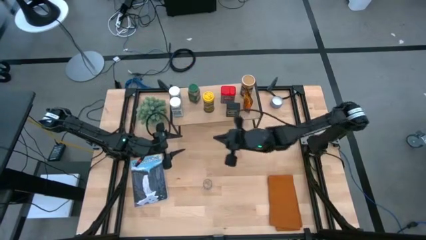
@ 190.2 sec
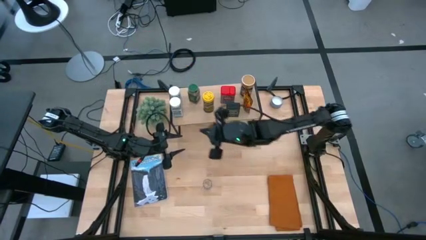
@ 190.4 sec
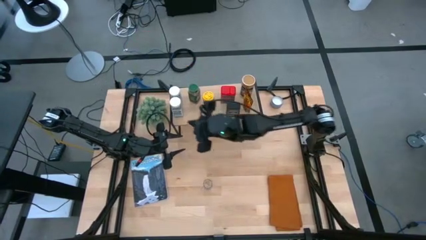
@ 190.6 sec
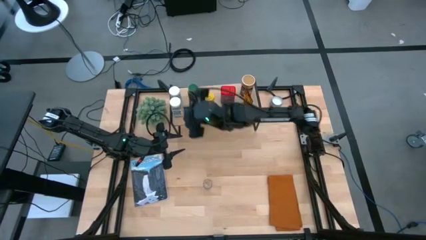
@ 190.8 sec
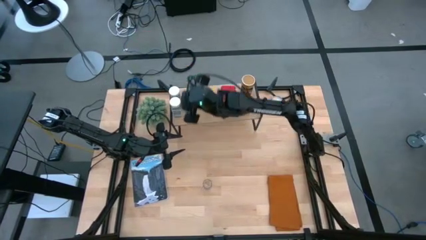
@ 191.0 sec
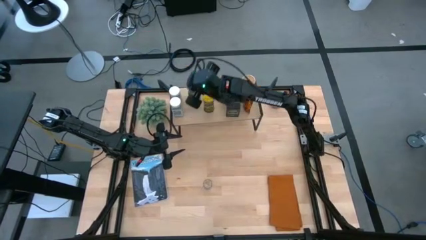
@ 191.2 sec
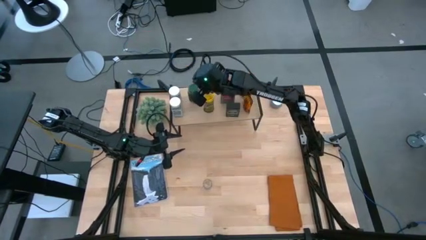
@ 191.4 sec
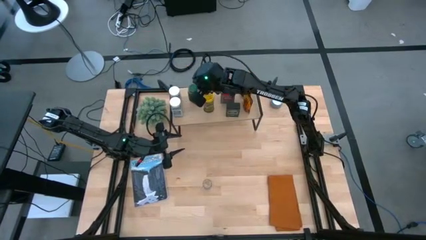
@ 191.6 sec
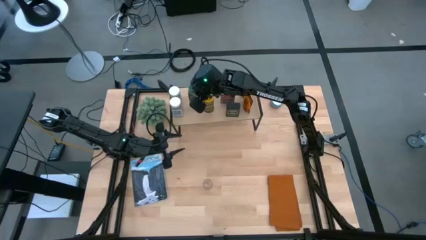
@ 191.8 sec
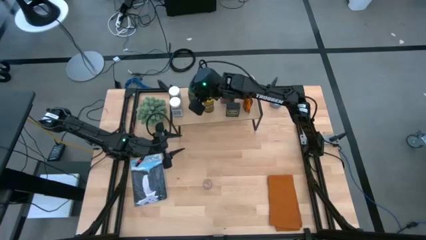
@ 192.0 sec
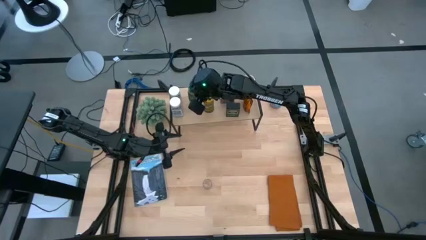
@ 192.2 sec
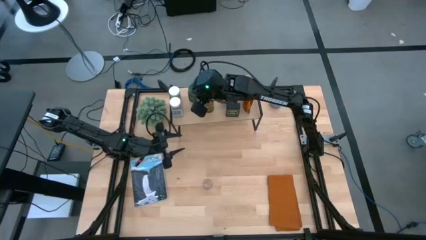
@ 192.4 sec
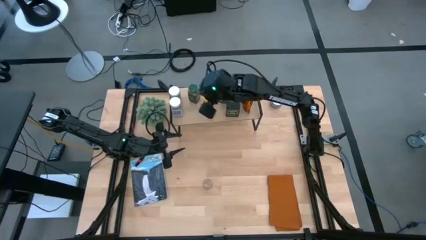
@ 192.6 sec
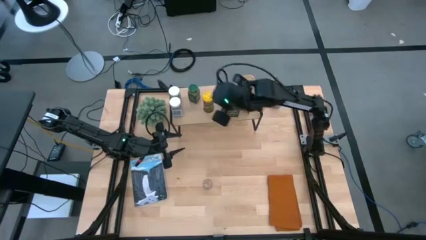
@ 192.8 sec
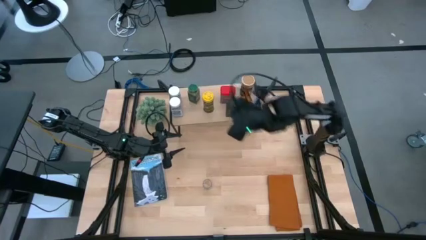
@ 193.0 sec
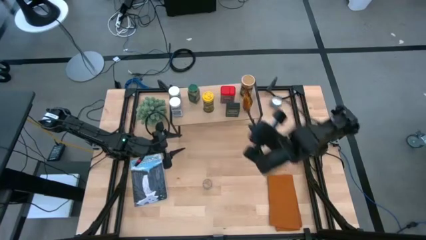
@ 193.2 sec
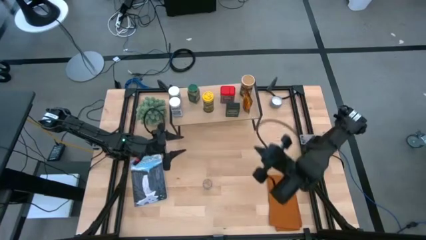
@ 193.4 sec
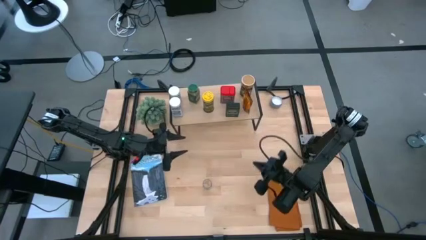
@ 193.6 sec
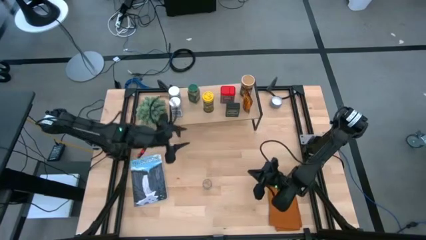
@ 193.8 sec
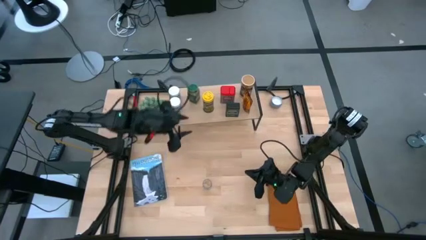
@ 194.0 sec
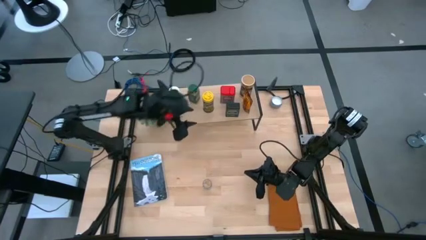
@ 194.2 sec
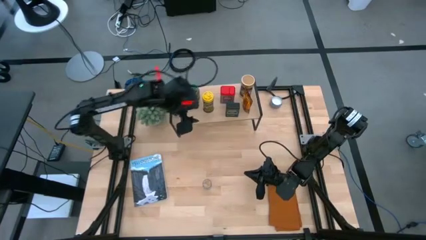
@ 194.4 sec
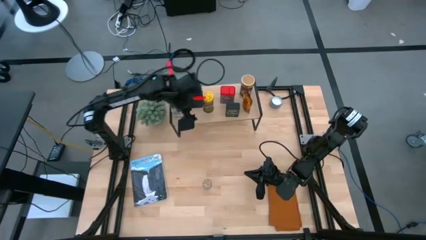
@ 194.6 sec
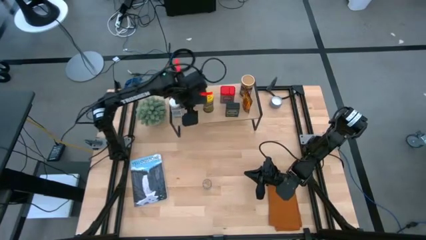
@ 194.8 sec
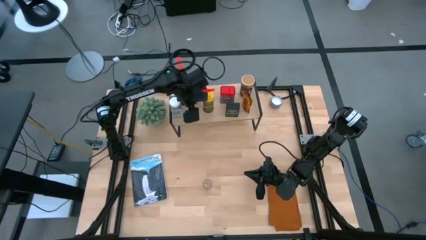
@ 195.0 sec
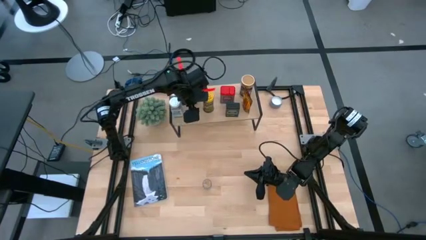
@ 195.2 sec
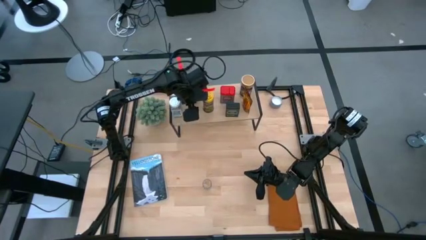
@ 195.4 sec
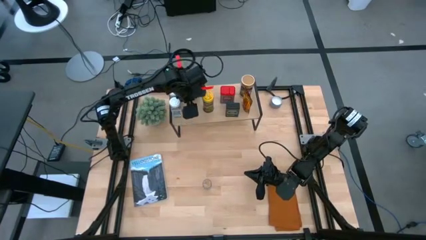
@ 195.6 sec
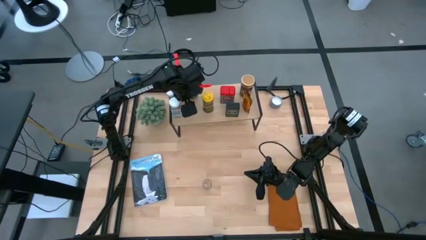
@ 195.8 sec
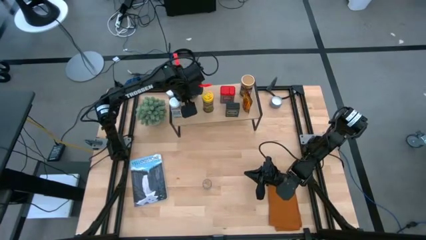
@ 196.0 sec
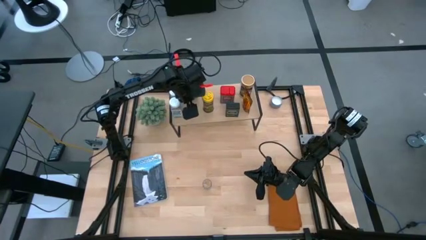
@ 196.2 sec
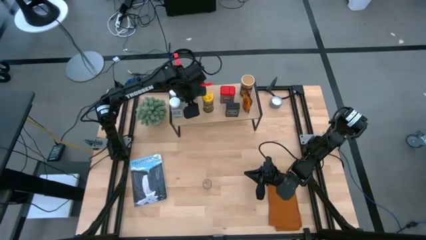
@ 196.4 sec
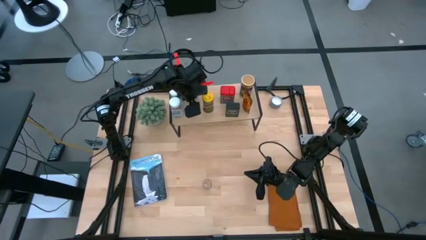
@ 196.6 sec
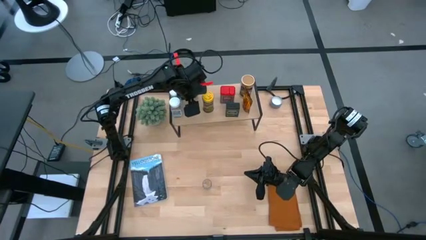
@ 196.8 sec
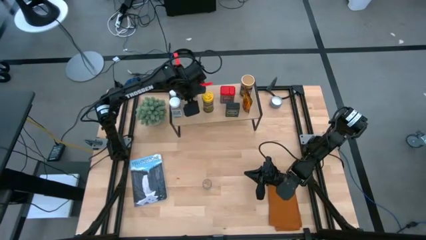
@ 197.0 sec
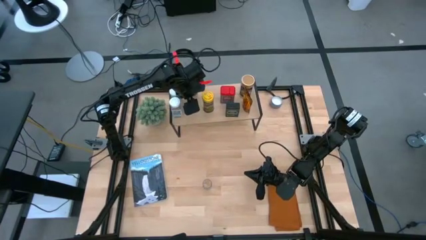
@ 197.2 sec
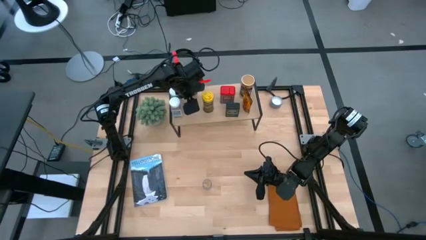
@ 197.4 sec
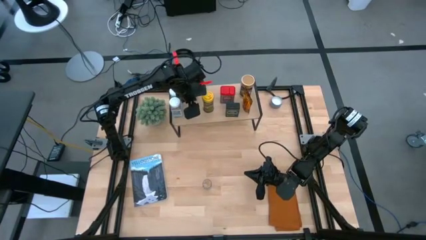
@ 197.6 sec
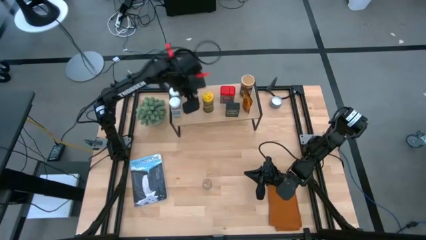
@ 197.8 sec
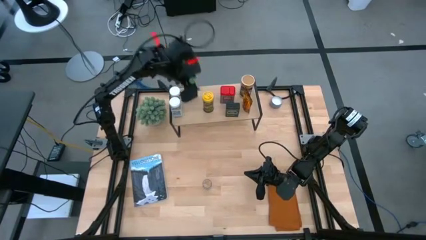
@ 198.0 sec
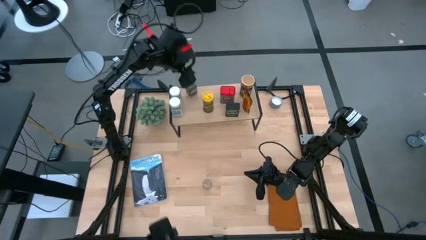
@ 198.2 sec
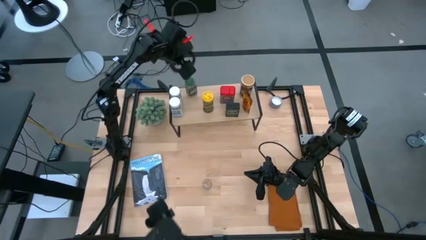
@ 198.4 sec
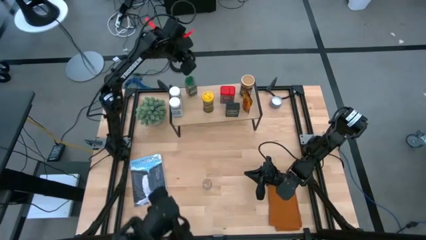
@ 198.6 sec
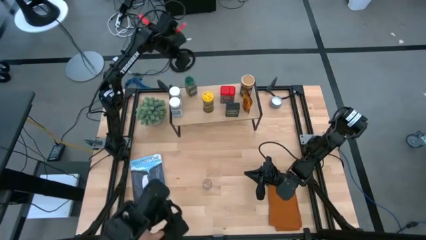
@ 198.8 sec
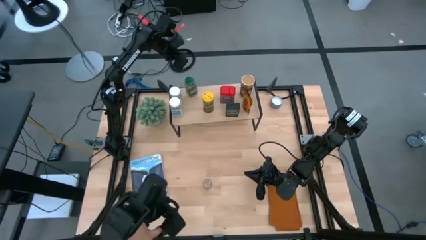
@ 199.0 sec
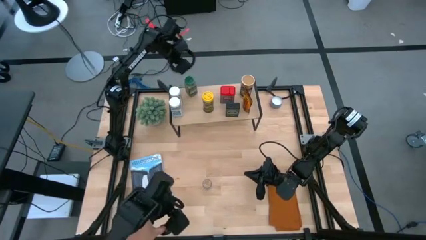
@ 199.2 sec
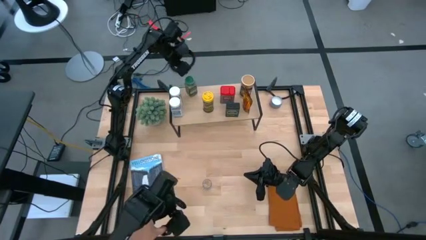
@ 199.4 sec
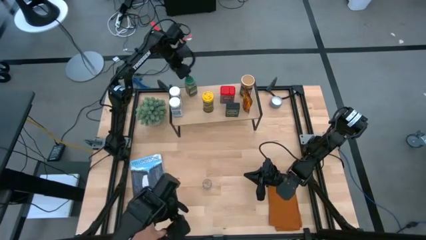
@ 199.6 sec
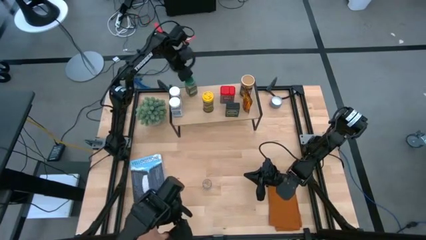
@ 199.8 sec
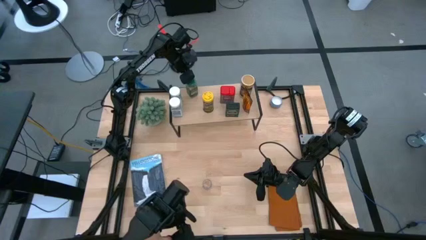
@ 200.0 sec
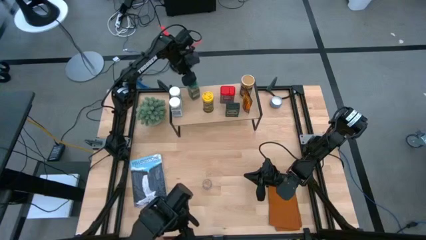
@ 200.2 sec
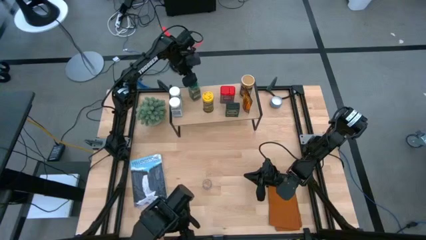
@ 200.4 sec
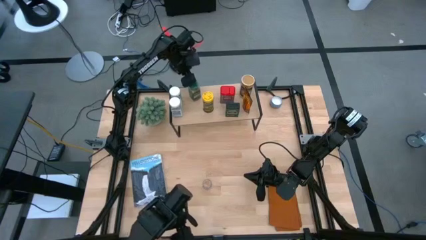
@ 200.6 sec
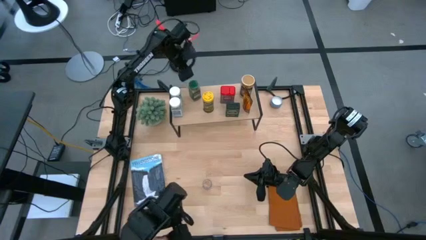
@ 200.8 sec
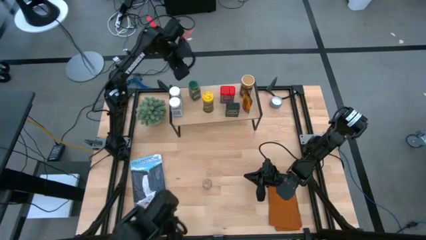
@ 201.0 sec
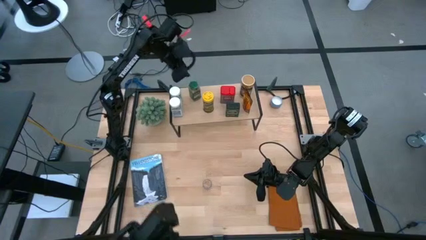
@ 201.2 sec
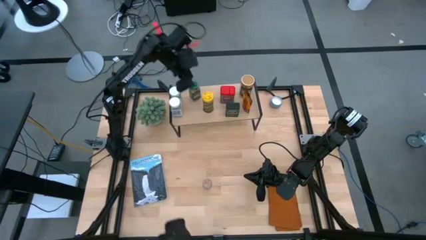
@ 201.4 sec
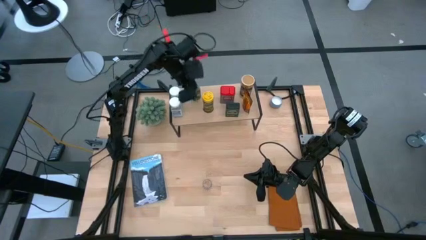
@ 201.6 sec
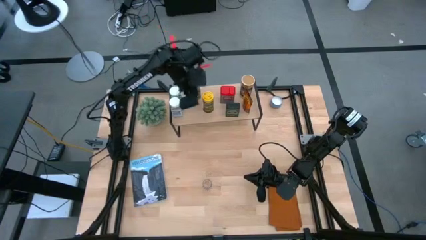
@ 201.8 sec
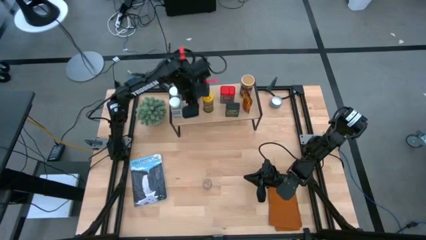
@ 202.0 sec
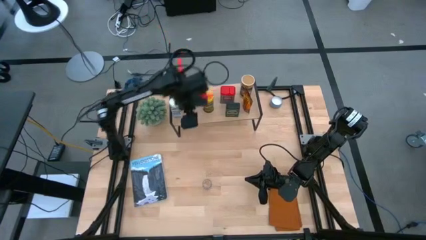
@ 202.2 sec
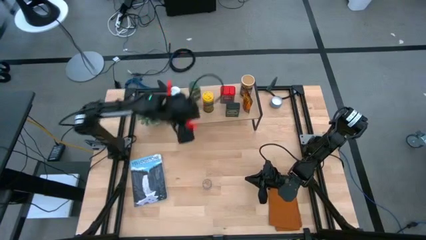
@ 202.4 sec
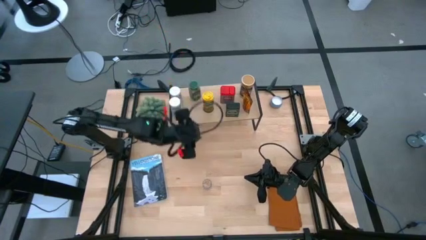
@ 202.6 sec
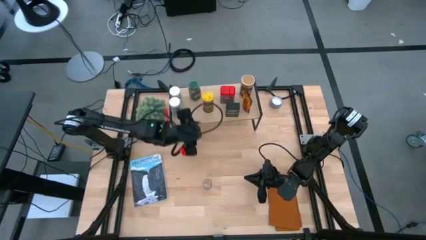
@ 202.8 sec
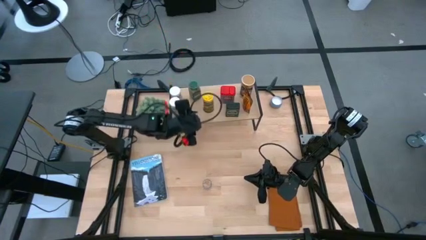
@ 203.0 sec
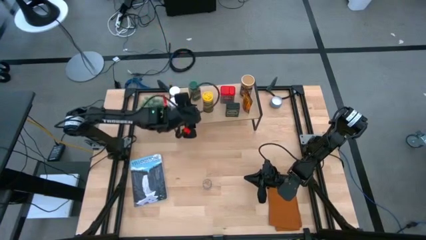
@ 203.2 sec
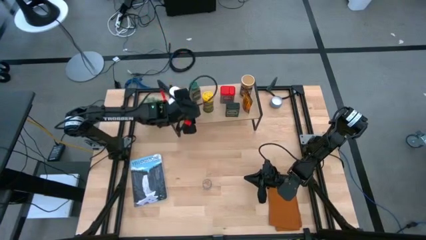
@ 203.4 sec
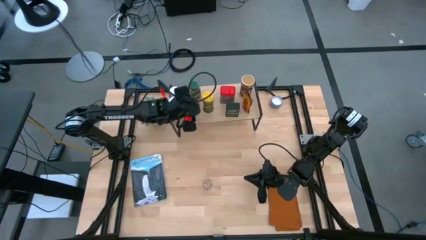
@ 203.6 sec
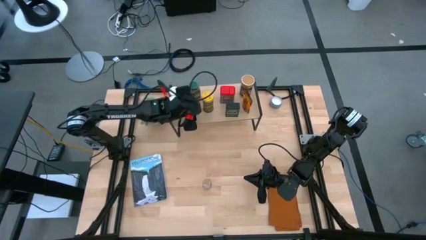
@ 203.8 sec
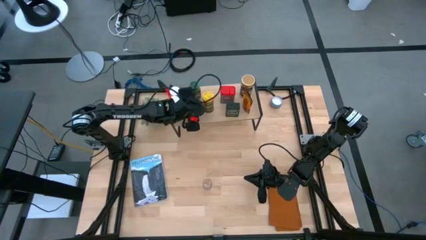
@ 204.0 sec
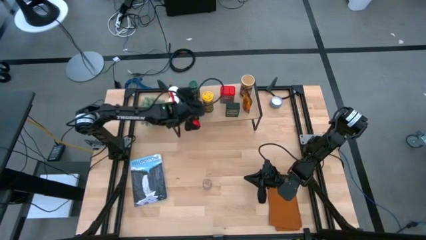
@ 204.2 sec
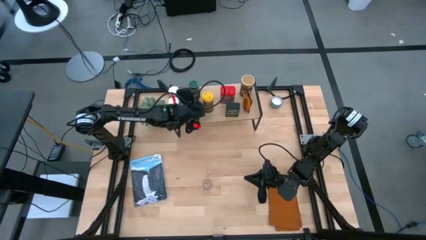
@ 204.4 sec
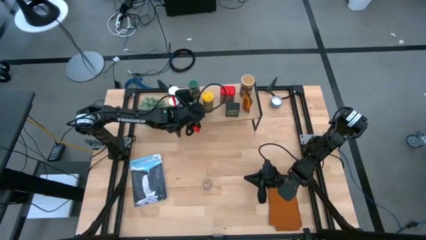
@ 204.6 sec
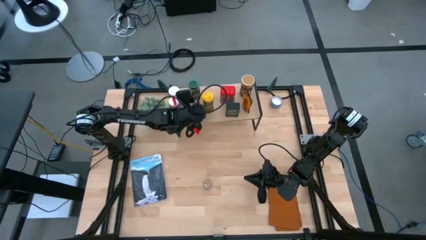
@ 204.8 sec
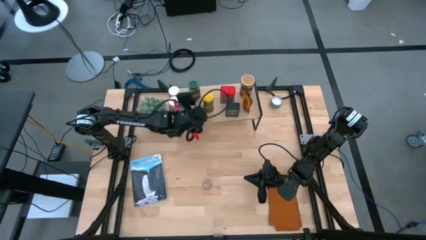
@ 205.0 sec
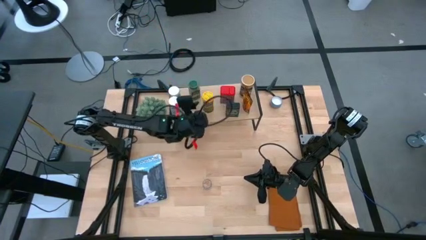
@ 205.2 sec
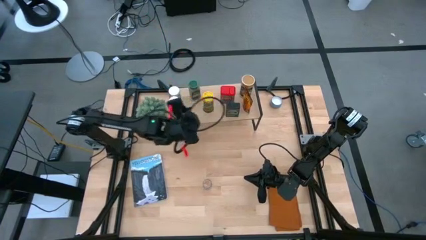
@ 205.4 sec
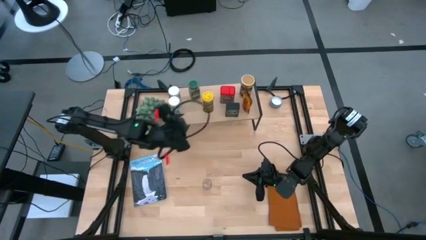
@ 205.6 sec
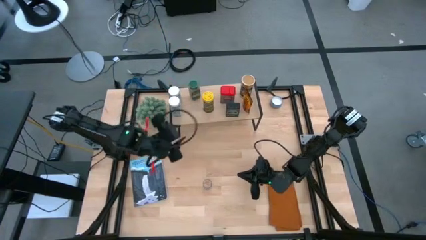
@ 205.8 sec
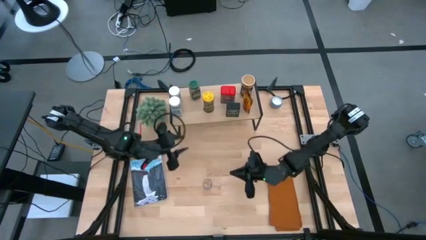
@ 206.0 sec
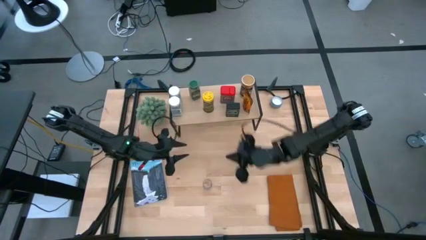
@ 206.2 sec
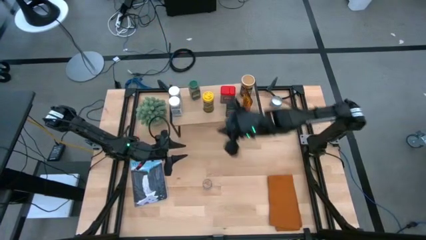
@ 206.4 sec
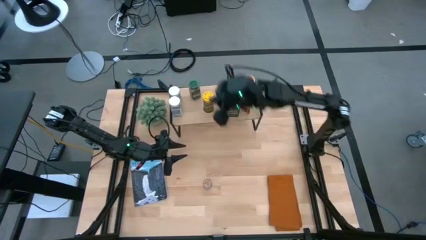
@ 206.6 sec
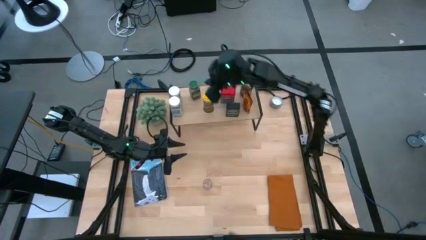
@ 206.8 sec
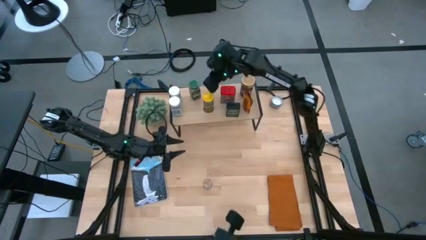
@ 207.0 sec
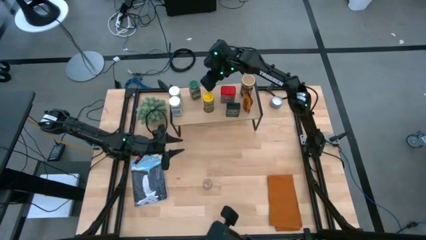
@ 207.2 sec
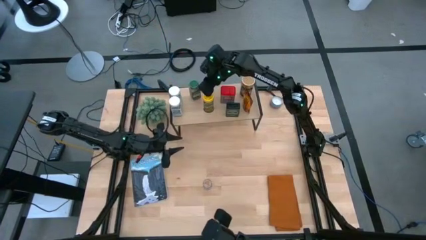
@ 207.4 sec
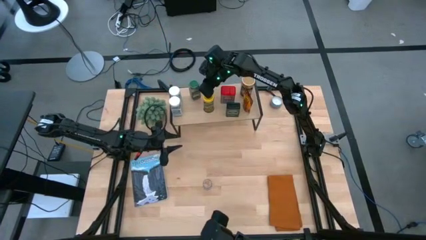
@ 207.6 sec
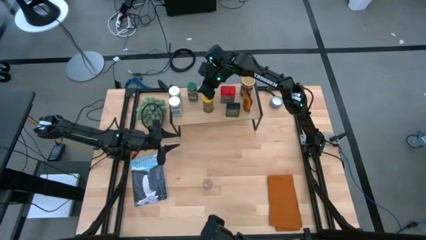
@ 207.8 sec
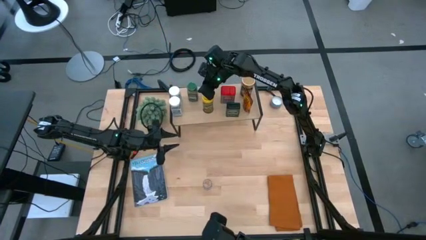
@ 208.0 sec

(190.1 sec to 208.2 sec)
Task: Shelf spices
Put the green seasoning bottle on the shelf
